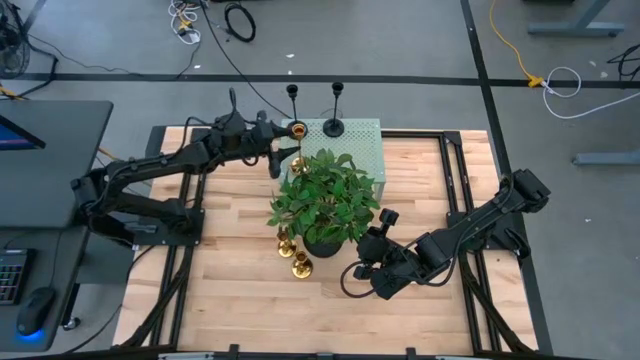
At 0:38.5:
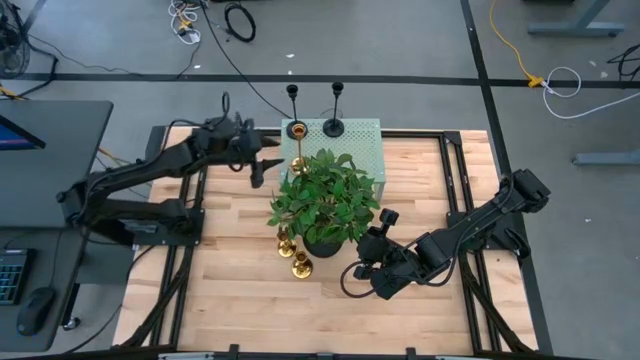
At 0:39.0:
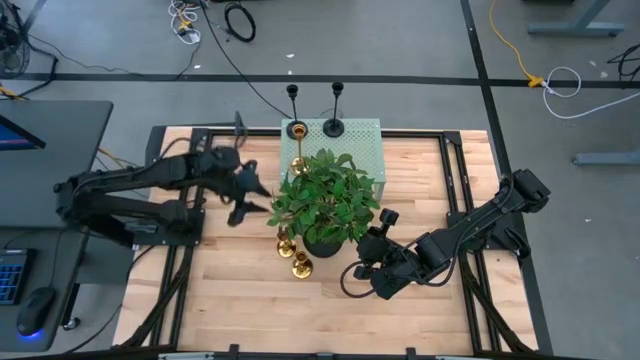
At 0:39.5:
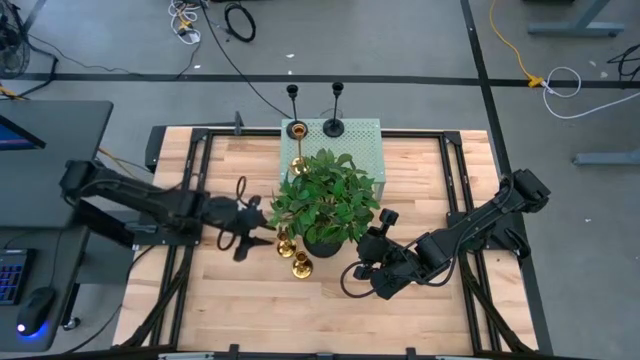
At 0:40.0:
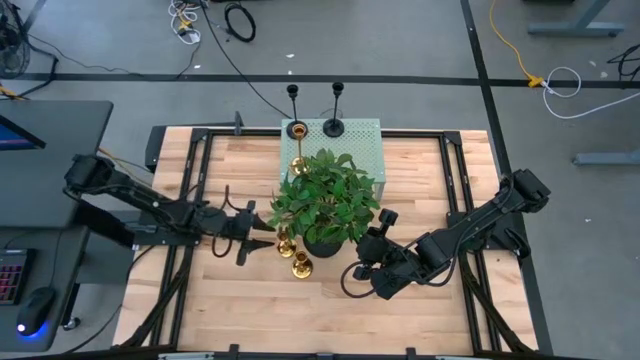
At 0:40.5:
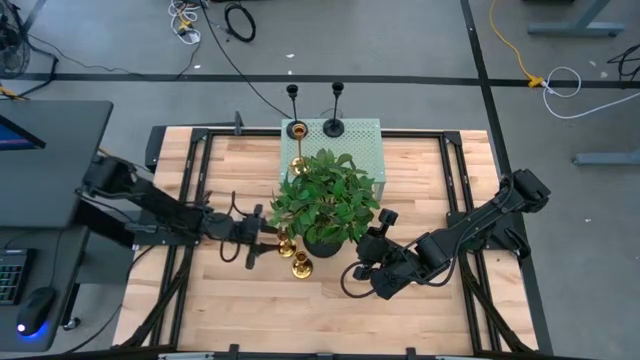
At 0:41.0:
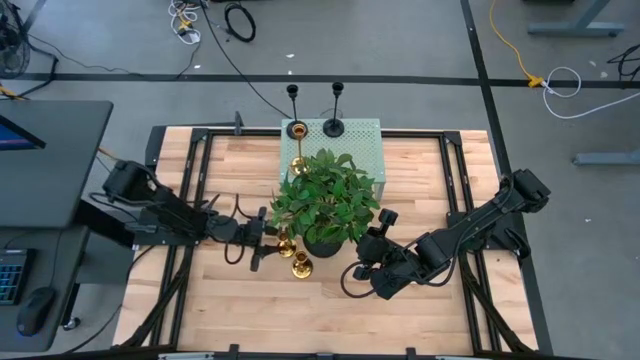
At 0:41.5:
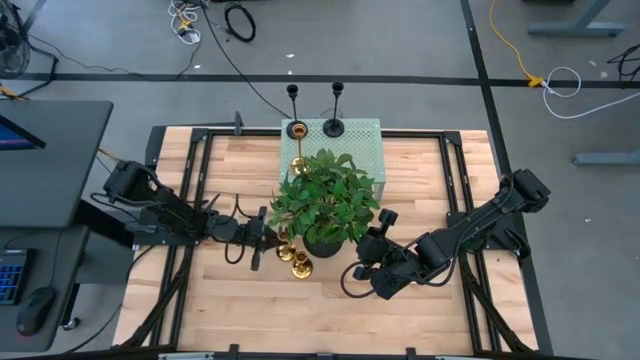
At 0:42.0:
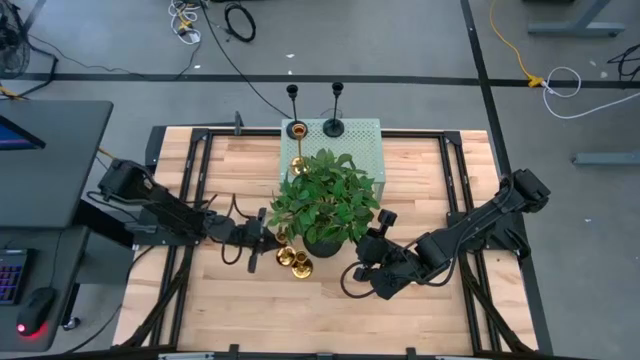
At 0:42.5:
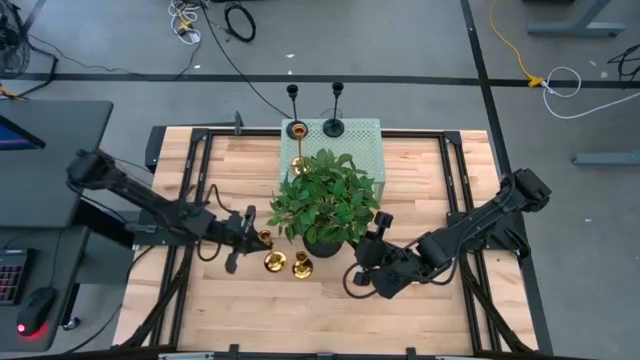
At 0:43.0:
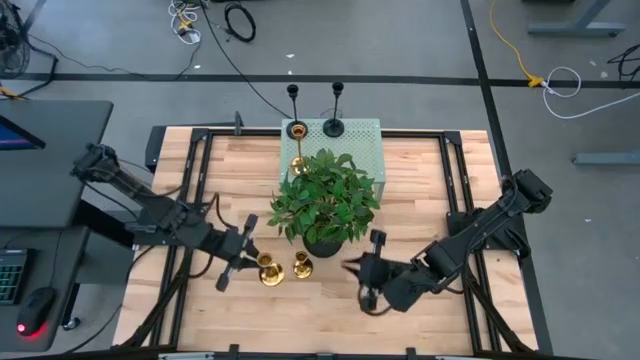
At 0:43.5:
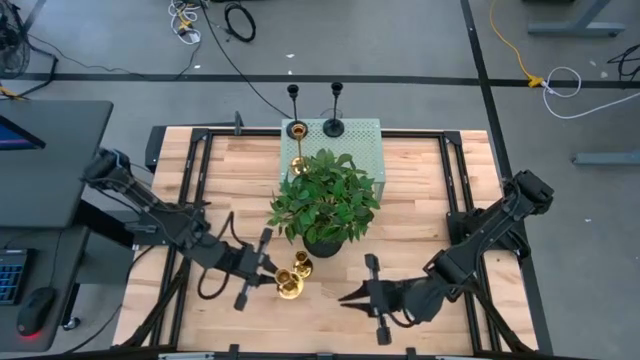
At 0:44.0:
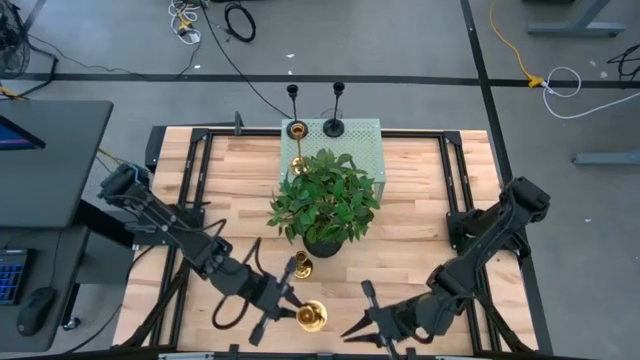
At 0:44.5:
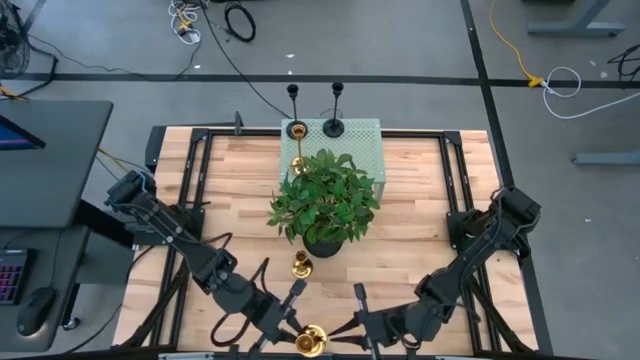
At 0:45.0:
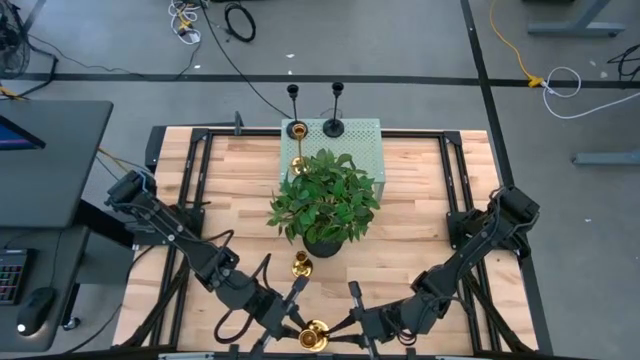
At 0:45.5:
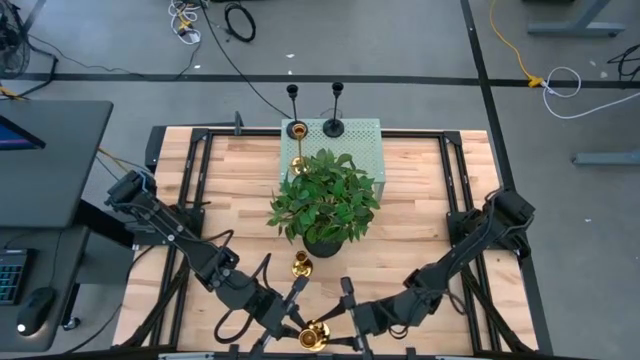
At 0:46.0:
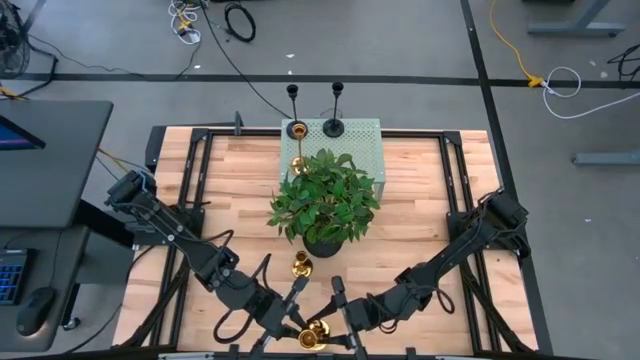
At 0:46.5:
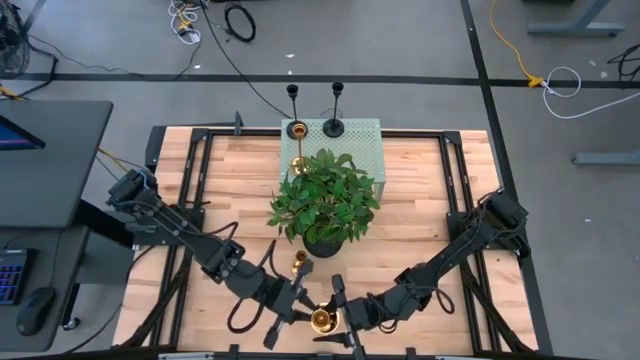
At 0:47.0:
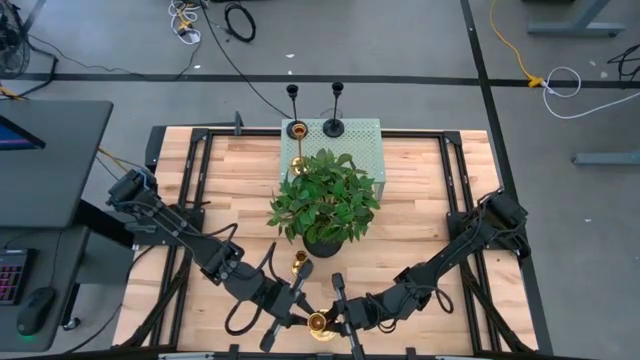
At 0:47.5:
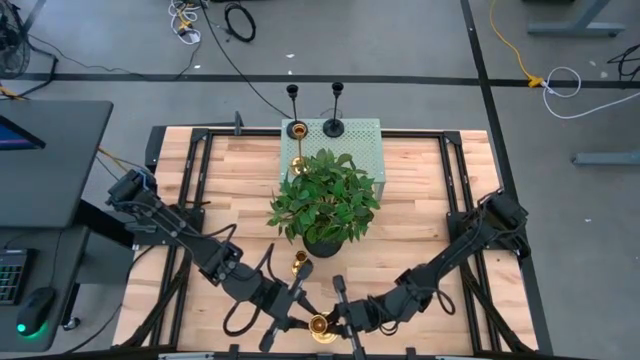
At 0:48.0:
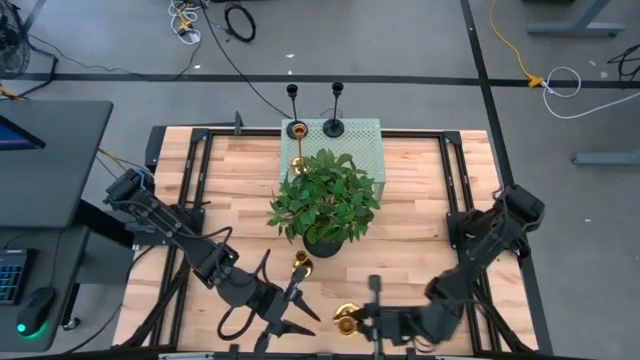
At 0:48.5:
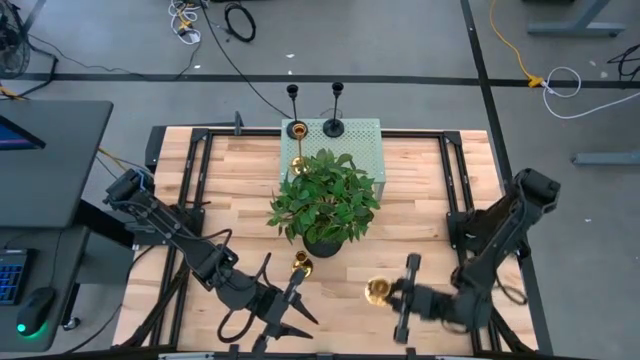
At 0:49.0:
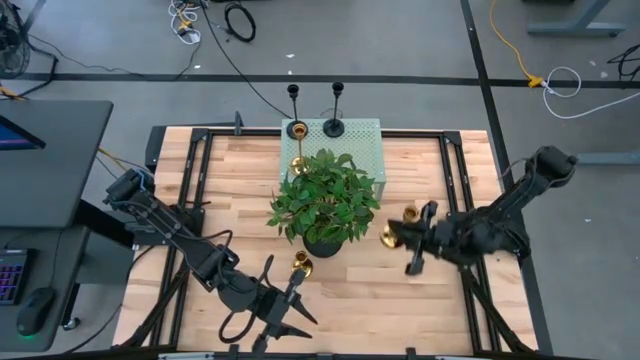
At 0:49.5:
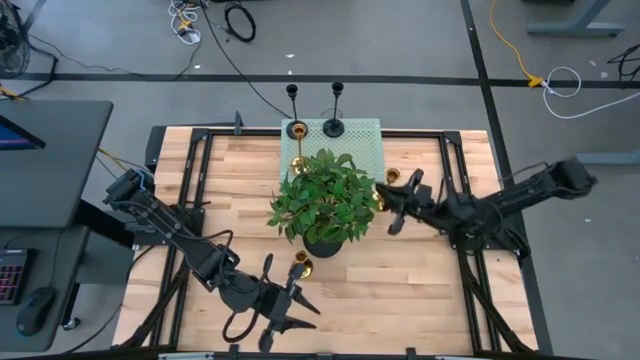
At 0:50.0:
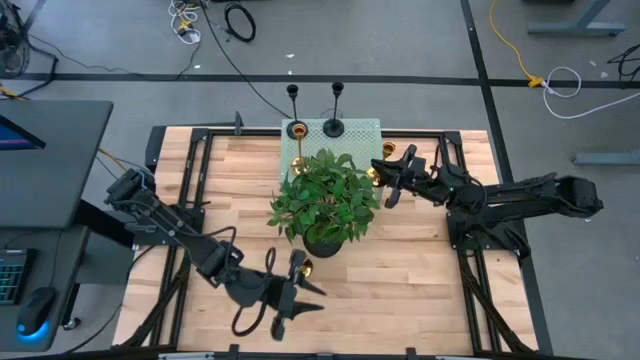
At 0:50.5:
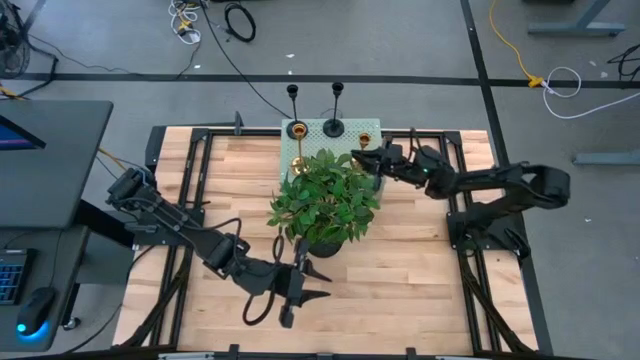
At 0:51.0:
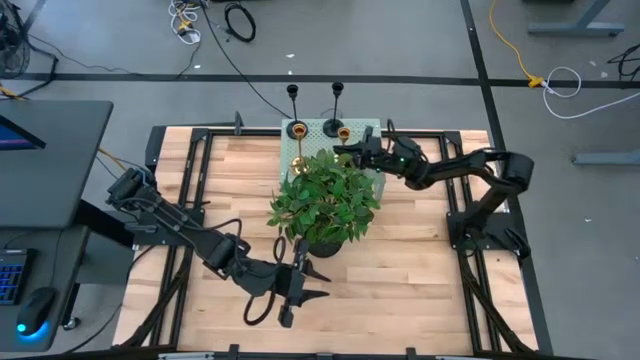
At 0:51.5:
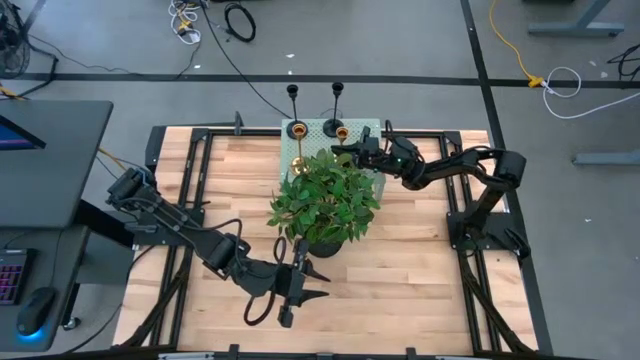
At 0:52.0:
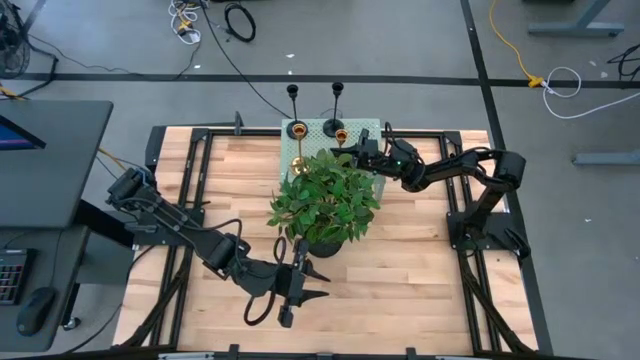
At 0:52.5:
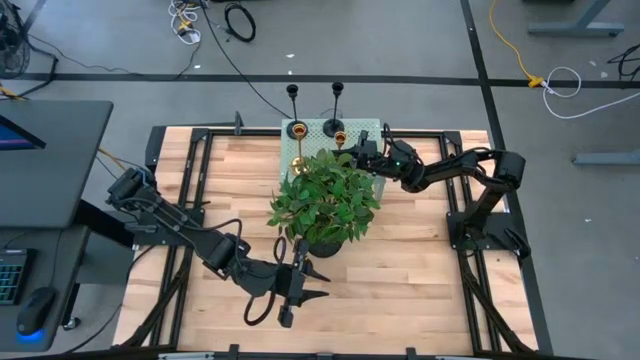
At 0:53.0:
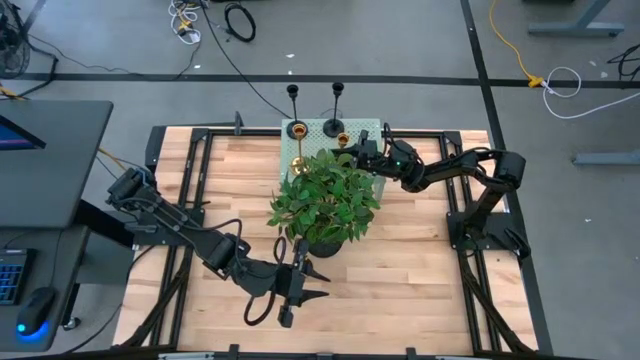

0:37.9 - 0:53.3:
Task: Pick & Place candle stick holders
Put the left gold candle holder on the shelf

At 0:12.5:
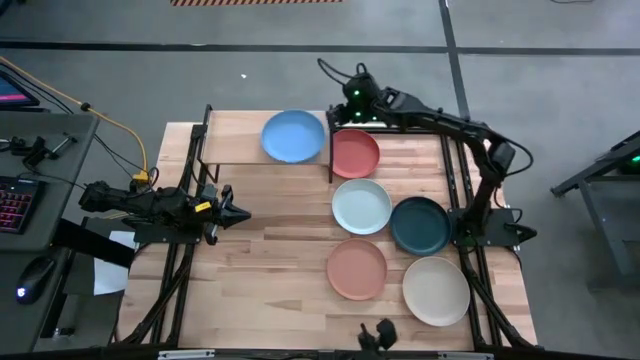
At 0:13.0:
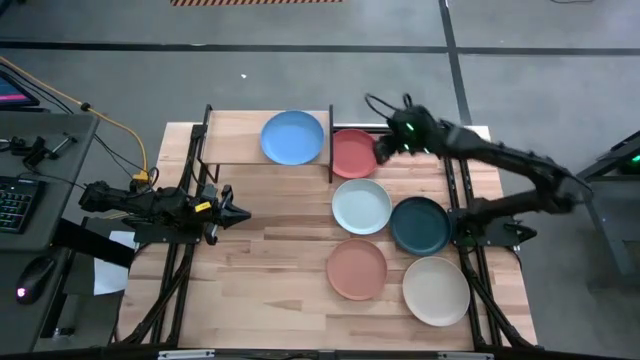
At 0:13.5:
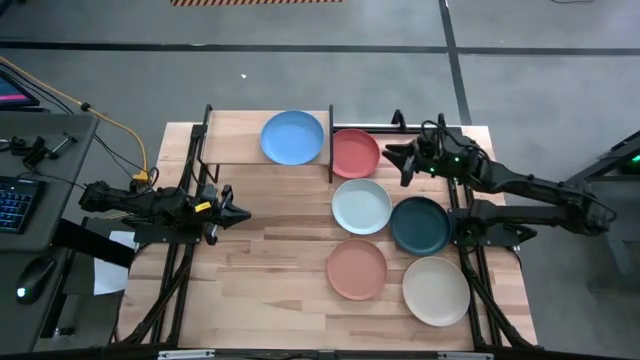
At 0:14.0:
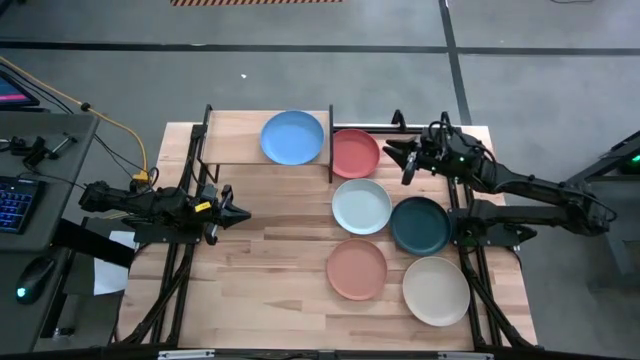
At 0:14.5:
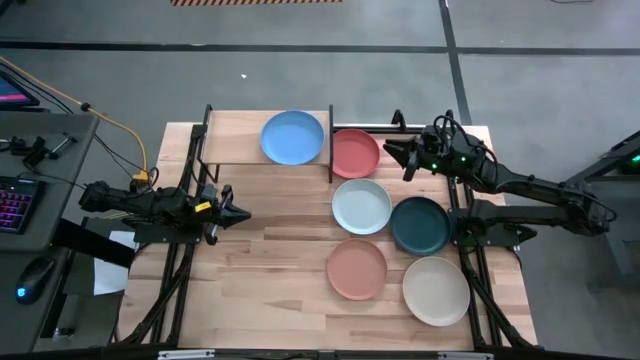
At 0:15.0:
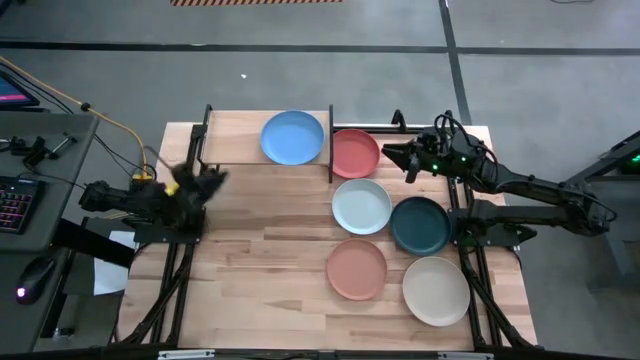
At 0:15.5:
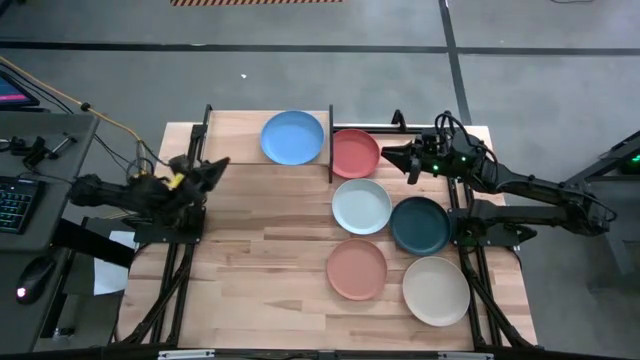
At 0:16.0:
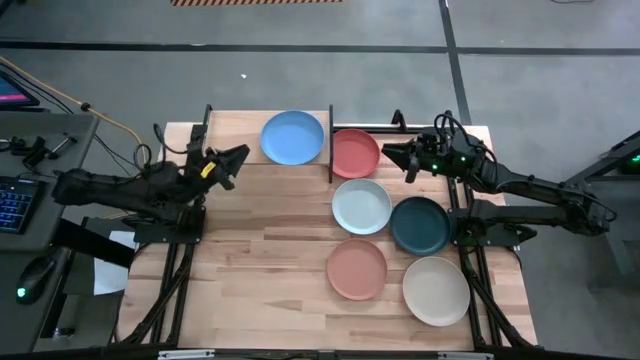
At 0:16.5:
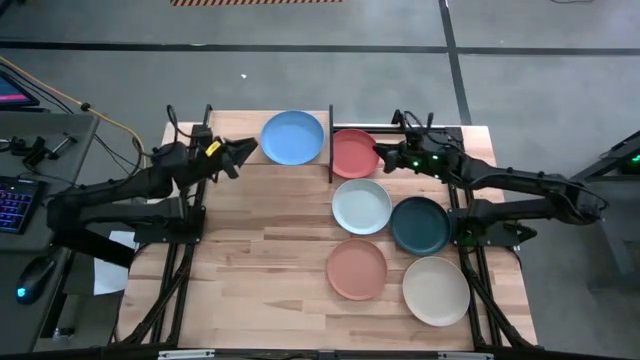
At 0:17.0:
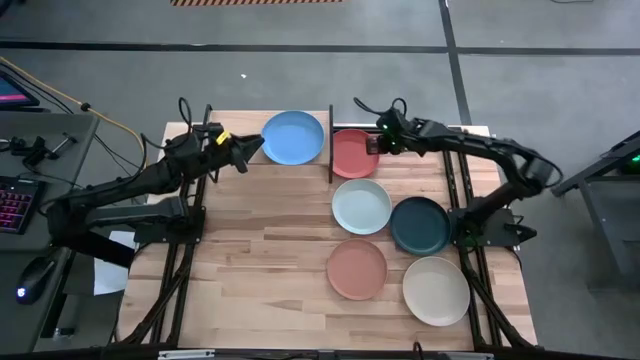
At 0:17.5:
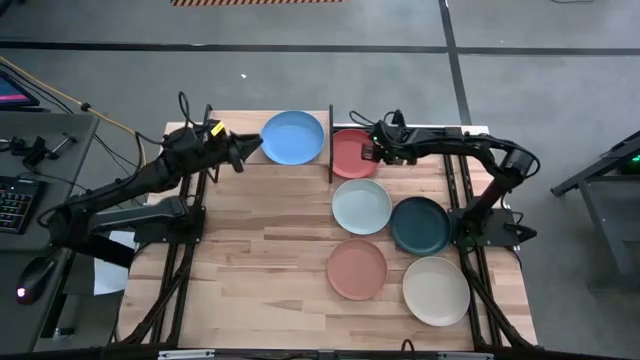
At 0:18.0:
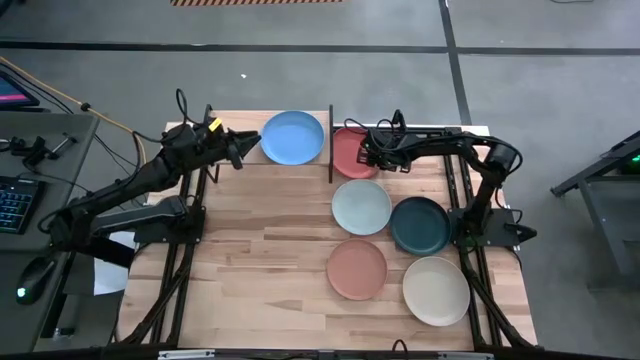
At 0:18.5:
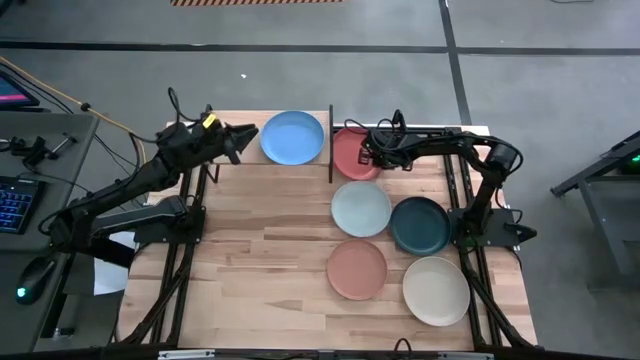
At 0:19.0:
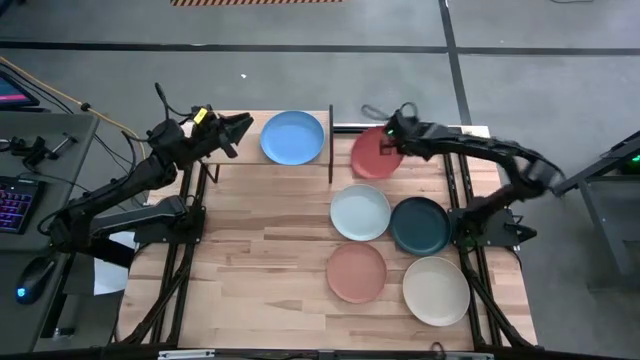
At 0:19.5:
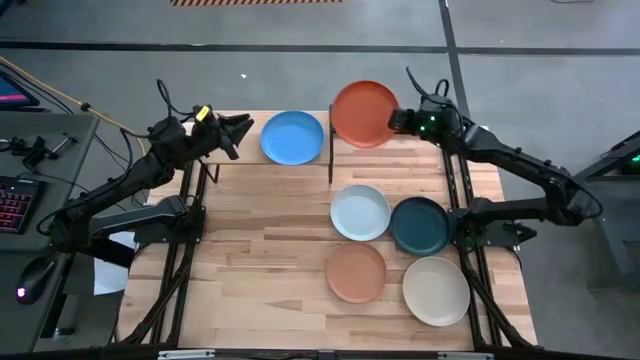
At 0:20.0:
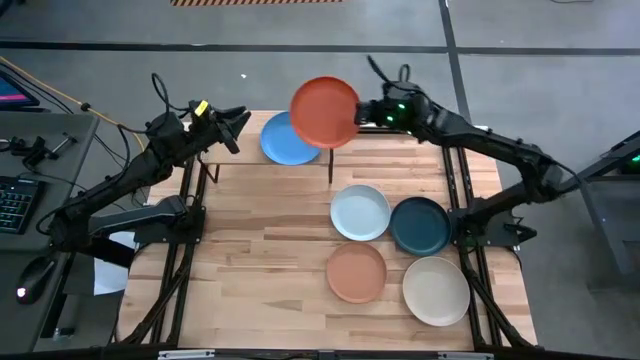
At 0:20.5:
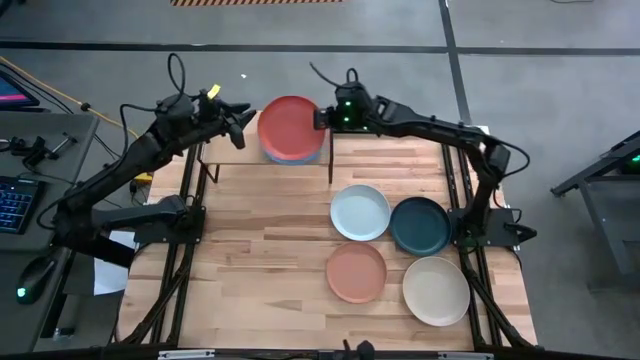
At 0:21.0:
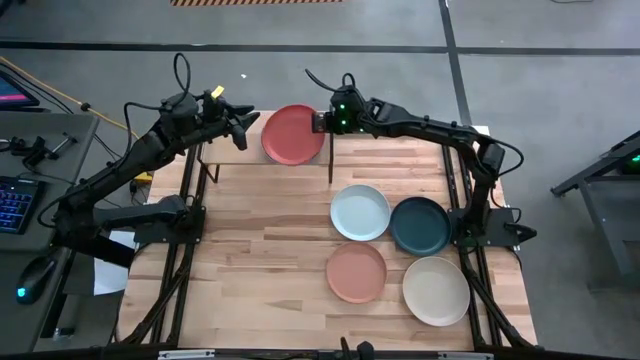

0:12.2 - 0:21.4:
Task: Place and stack plates onto a shelf
Stack the orange plate on top of the light blue plate on the shelf
